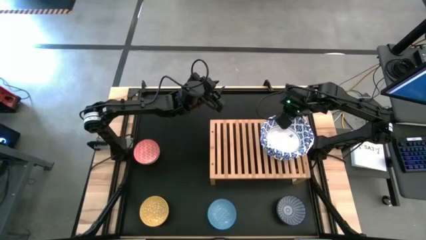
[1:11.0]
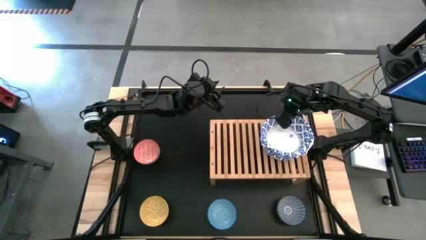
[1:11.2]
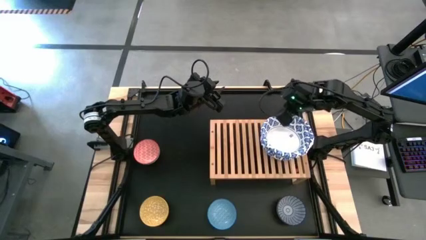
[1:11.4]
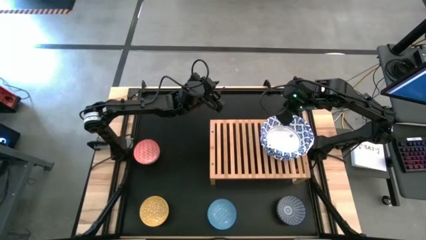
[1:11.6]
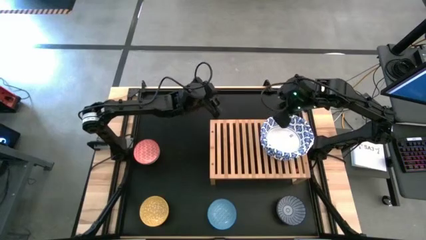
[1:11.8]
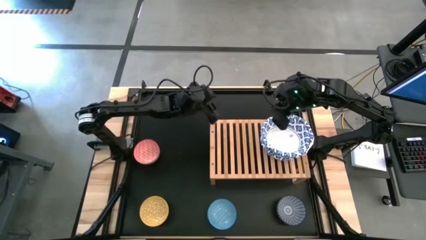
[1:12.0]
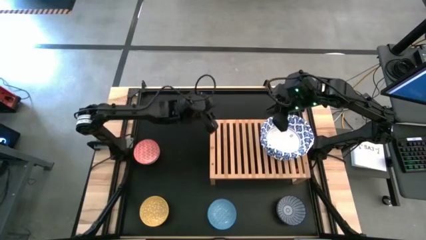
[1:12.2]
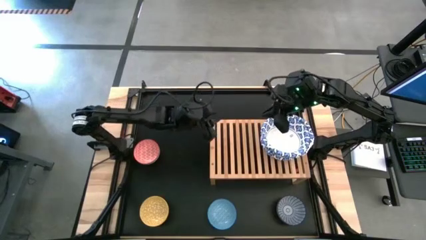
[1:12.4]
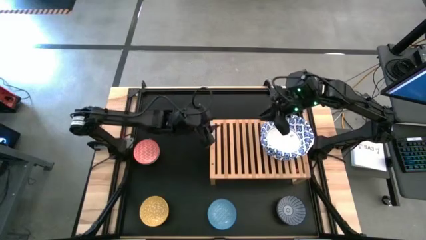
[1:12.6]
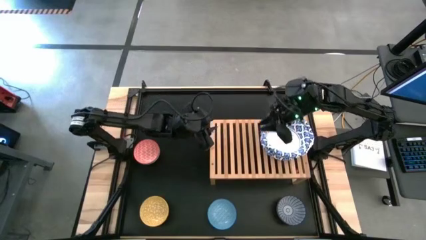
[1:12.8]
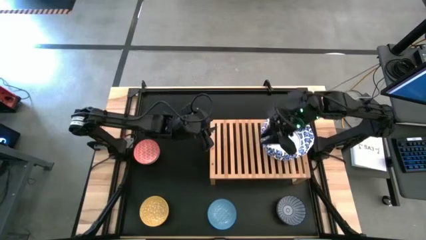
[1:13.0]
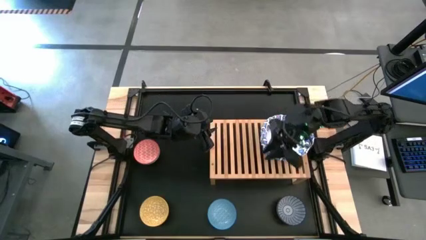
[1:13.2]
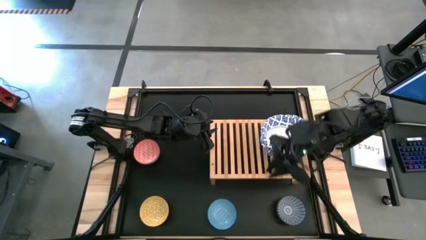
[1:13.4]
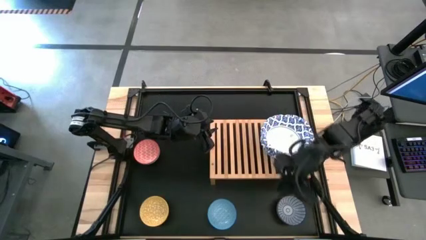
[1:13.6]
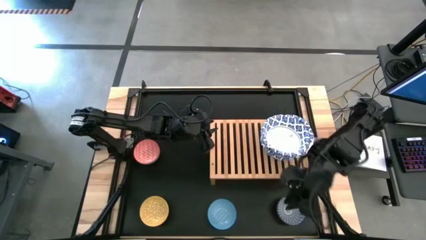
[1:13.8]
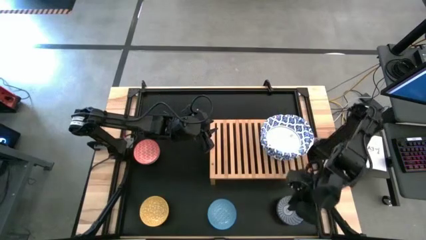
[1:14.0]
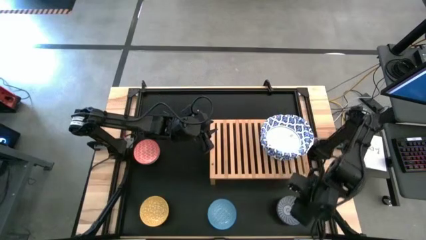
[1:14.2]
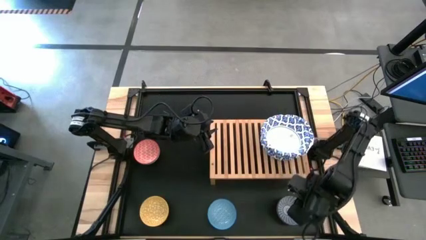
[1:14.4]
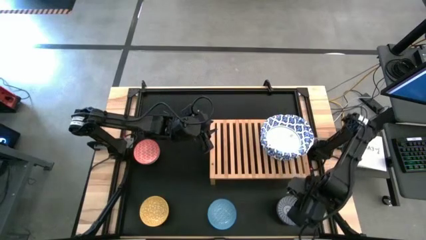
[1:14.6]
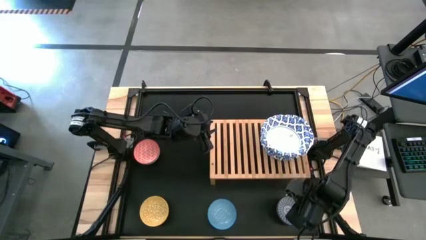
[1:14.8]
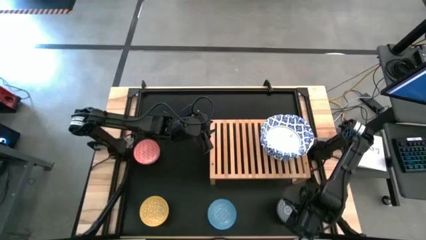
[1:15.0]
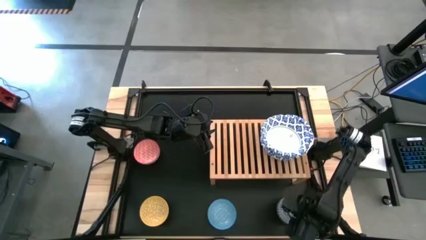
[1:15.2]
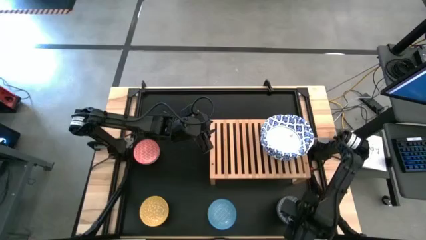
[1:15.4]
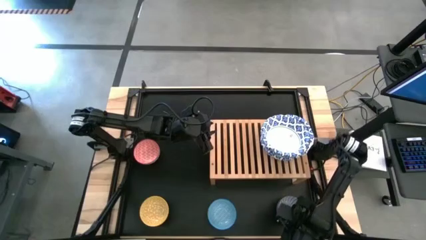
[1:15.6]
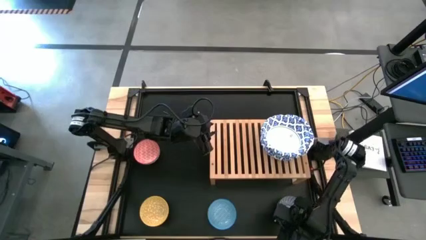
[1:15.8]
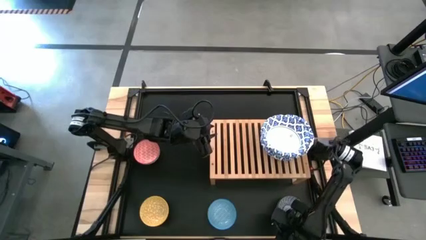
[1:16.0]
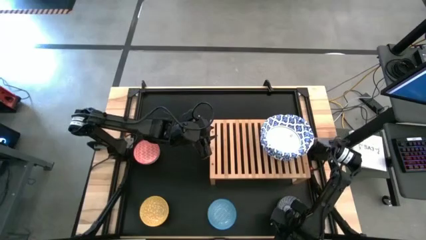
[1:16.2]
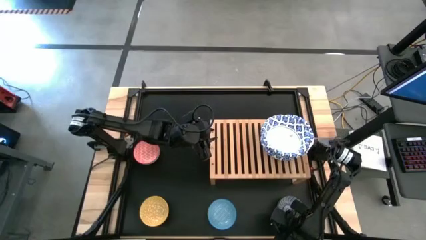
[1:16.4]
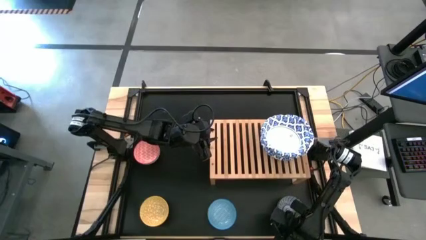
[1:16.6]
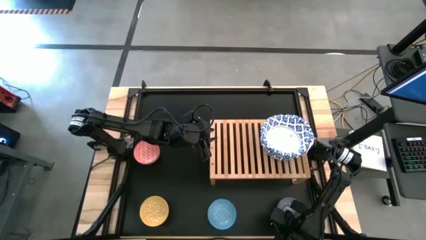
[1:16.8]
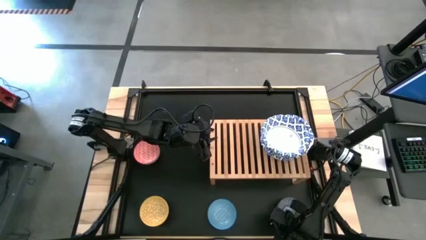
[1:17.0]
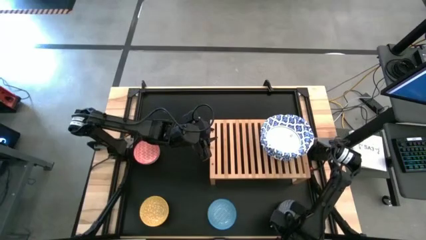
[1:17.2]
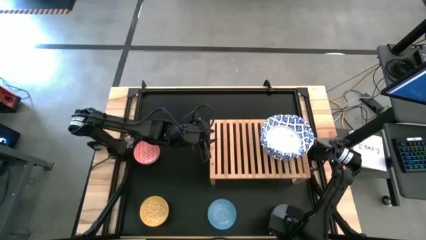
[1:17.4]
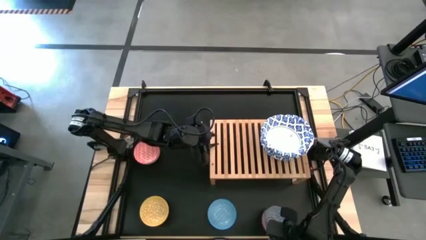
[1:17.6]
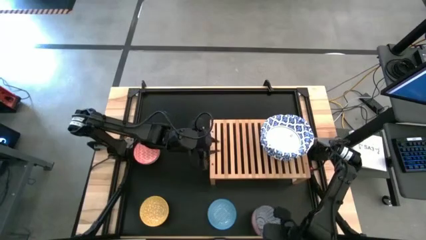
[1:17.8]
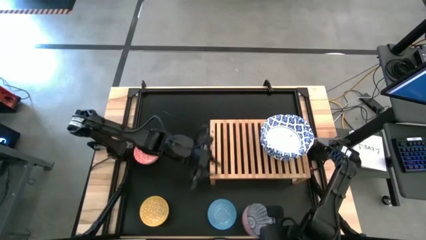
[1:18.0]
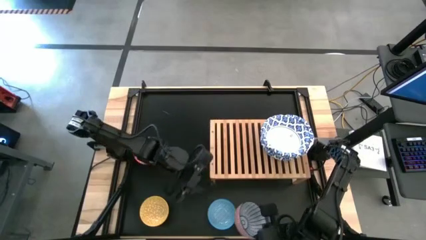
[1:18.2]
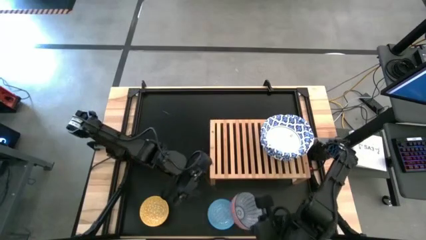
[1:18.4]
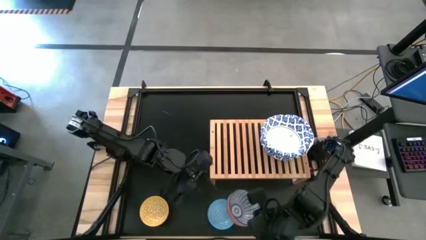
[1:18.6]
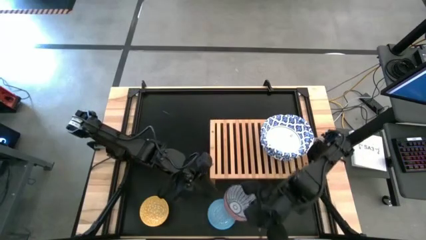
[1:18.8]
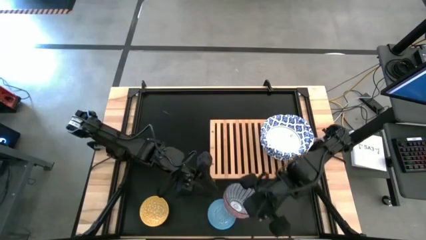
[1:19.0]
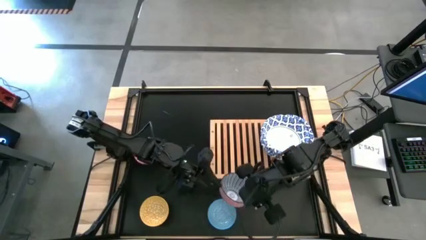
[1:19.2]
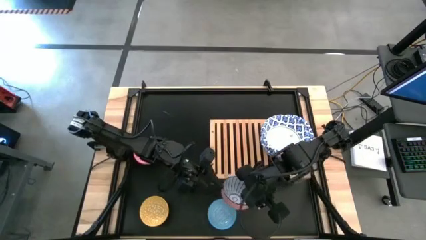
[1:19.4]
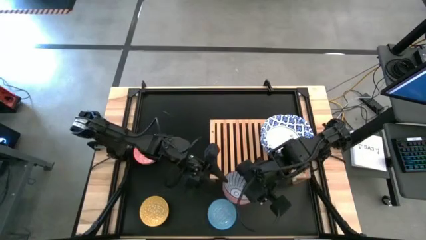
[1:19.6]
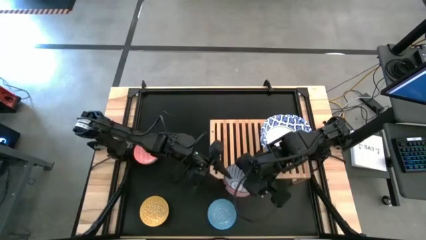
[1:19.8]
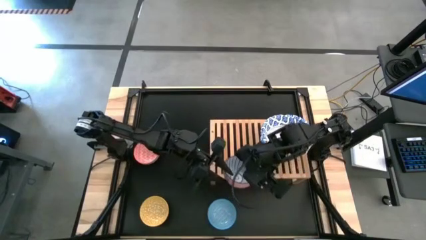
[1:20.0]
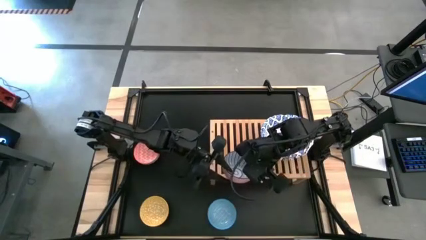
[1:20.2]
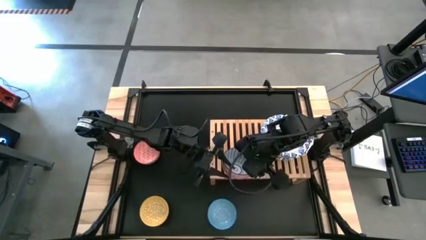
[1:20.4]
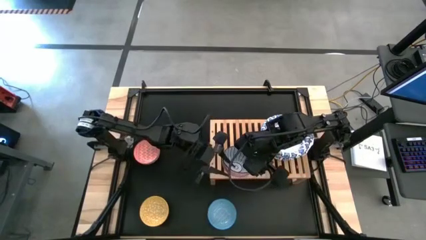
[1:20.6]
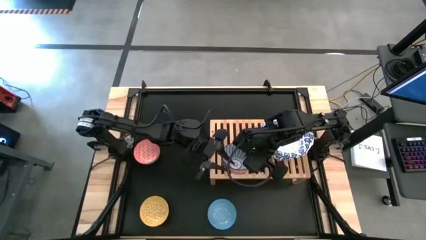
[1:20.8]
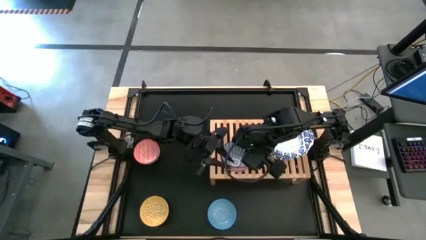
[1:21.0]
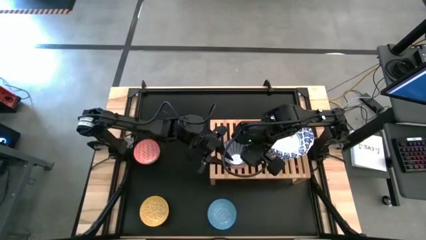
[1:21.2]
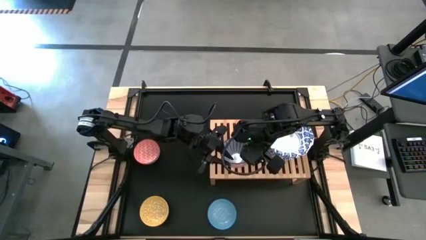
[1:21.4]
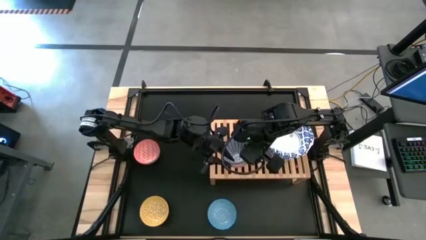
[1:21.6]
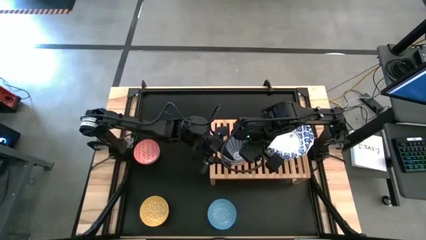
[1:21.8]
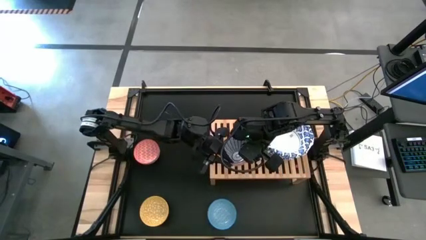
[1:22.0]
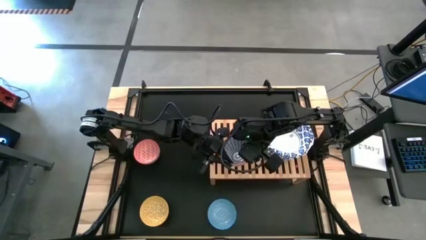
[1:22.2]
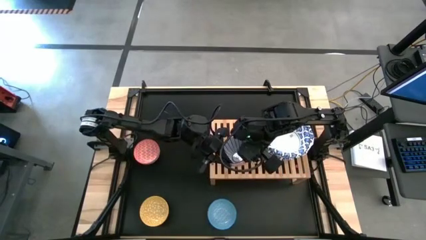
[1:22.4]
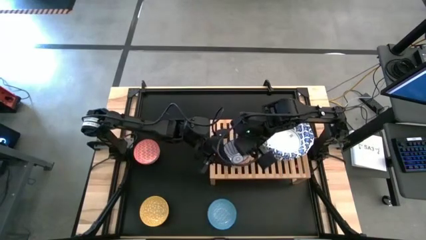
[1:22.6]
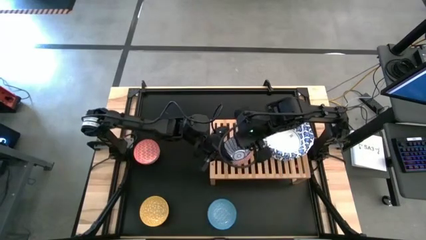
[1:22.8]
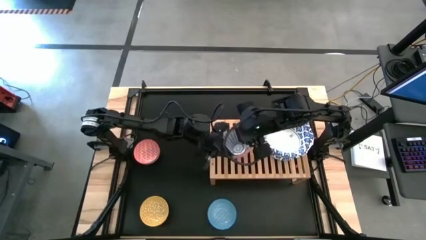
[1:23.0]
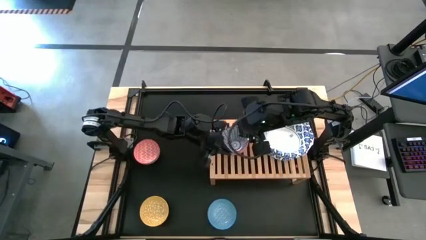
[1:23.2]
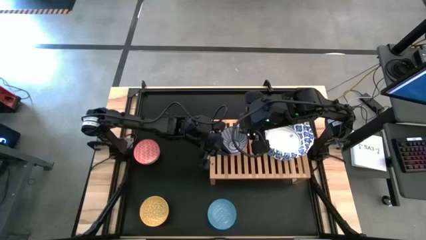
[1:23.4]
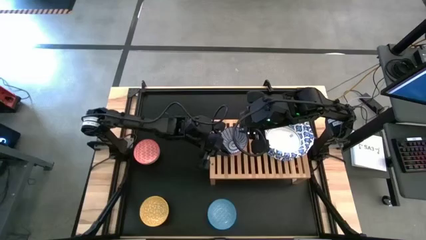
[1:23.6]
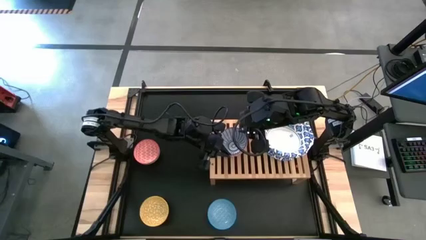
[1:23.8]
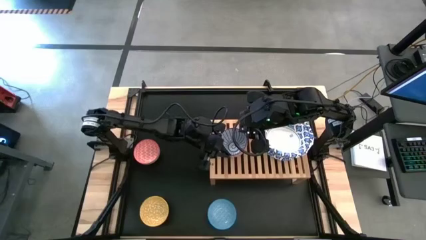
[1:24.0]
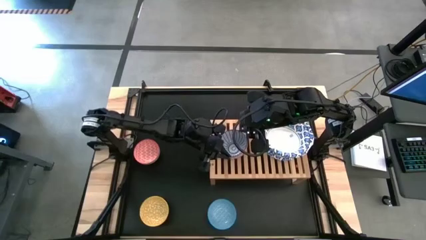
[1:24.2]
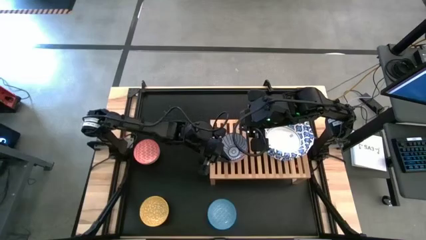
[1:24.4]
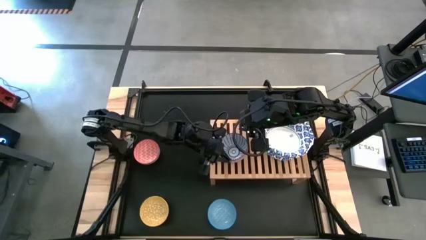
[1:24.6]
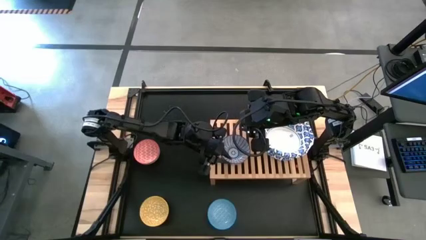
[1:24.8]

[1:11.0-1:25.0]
Task: Place and stack bowls onto a shelf
Put the small red and blue bowl on the shelf

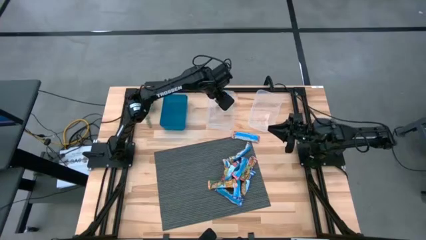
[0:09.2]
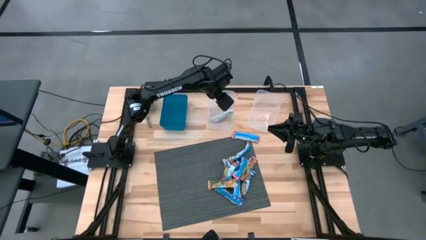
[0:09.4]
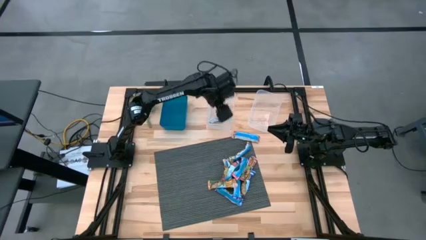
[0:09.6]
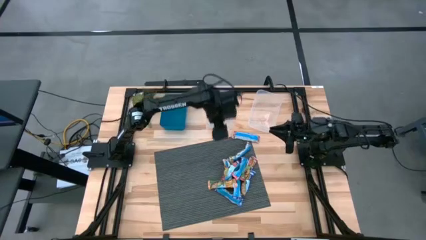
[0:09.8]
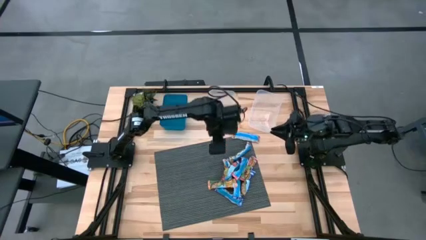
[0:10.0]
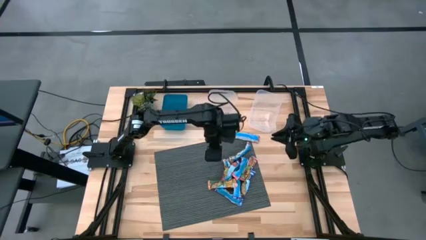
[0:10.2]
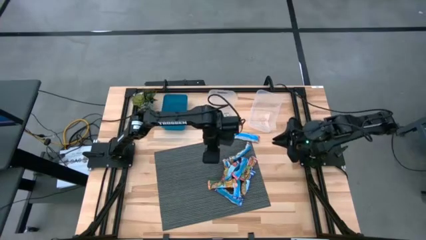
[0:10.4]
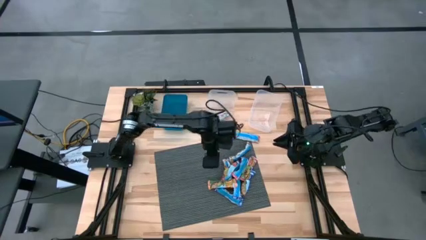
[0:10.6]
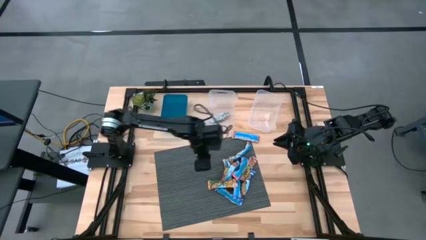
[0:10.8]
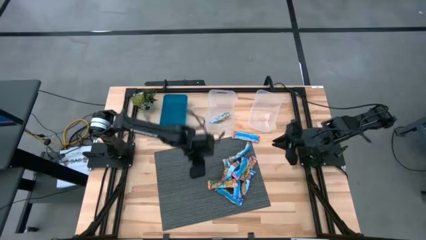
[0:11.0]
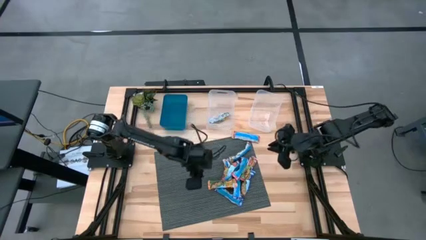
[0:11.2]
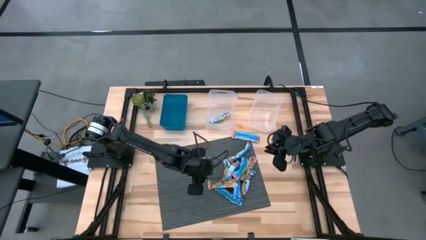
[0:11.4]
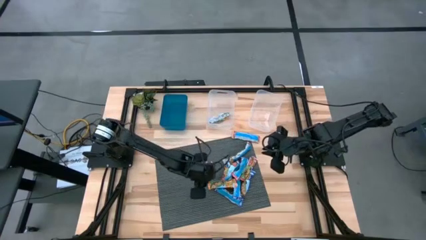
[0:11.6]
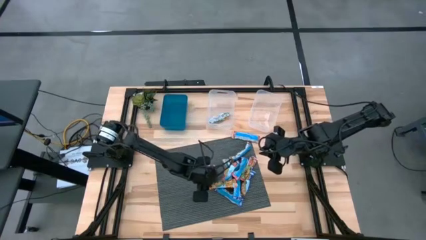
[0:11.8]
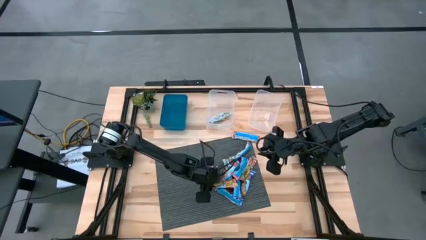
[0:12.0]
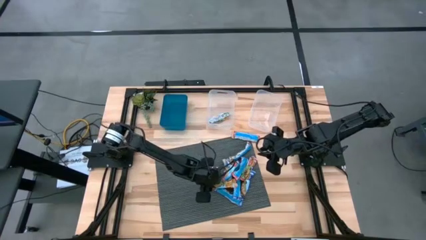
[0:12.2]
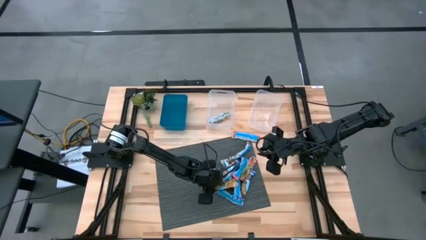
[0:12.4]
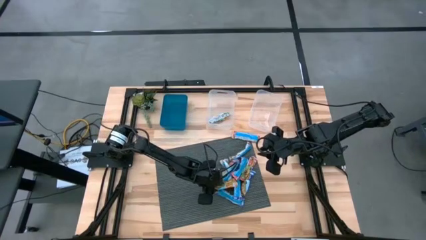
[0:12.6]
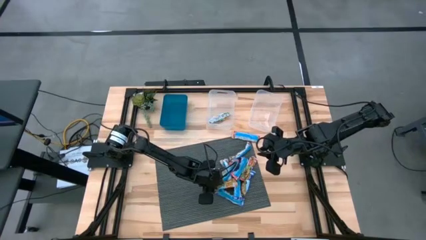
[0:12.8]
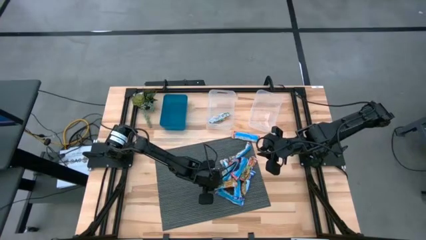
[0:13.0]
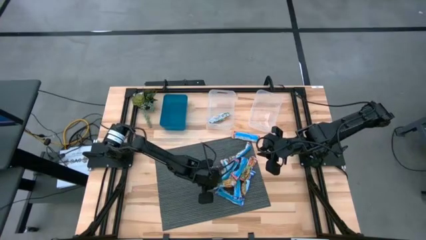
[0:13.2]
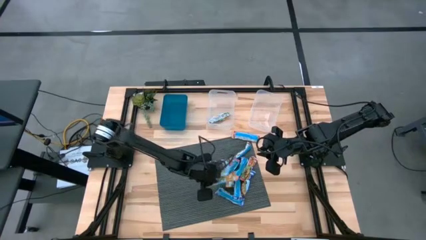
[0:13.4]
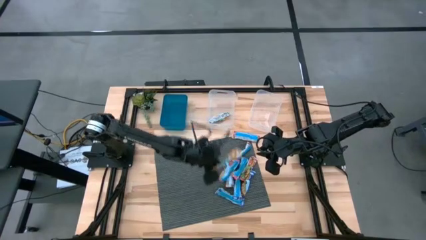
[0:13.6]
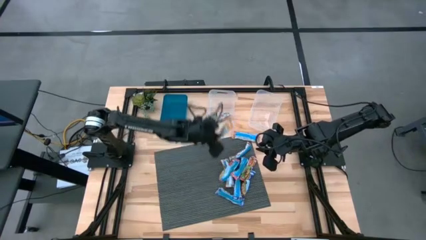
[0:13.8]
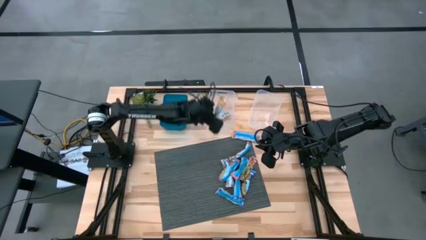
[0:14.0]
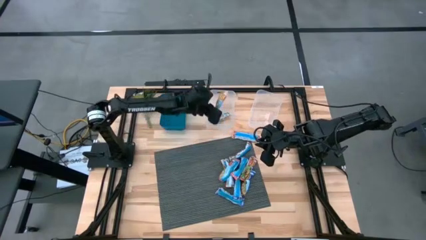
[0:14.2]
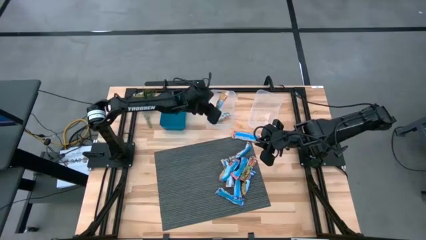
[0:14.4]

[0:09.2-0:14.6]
Task: Pick and place Granola Bars by type
Put the yellow granola bar into the left transparent bin
